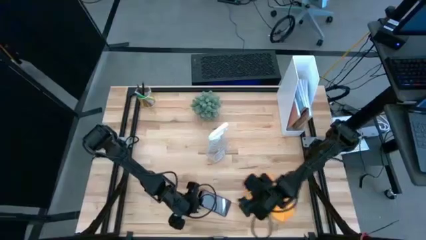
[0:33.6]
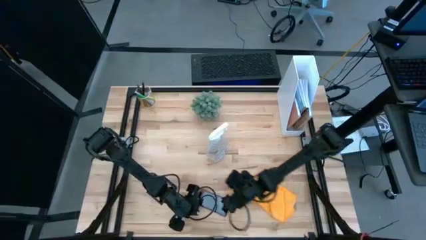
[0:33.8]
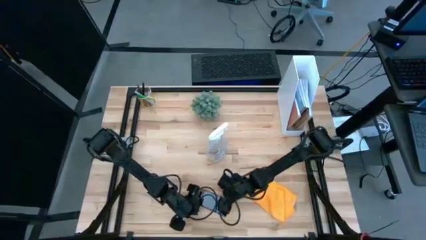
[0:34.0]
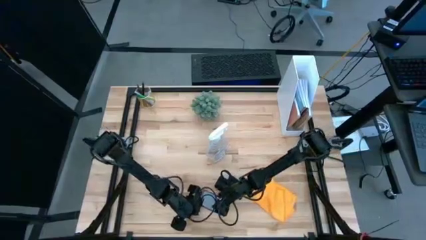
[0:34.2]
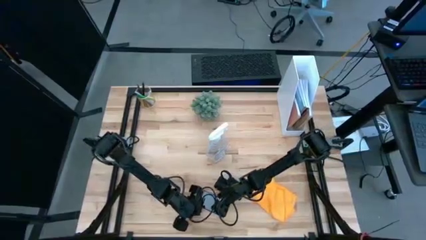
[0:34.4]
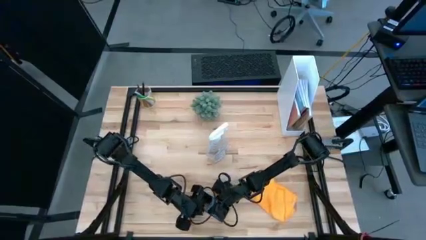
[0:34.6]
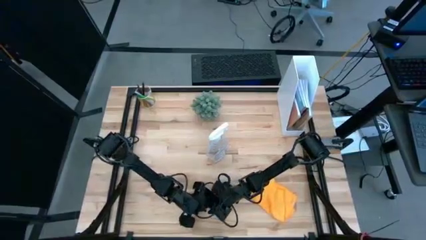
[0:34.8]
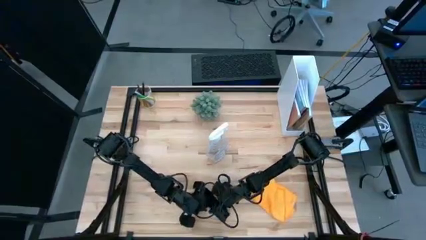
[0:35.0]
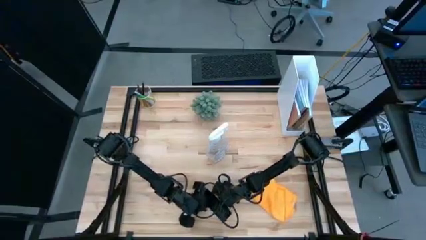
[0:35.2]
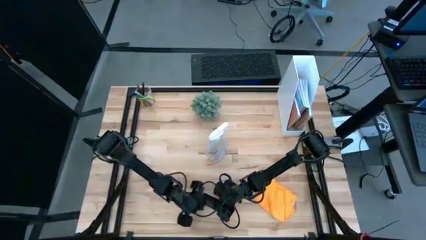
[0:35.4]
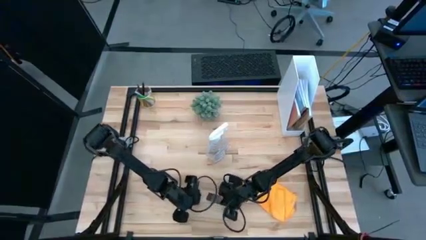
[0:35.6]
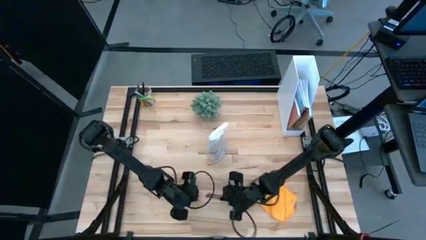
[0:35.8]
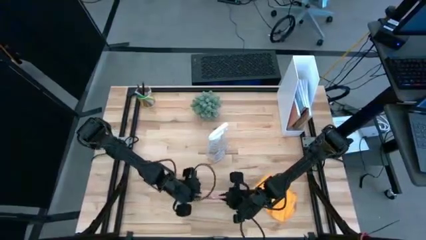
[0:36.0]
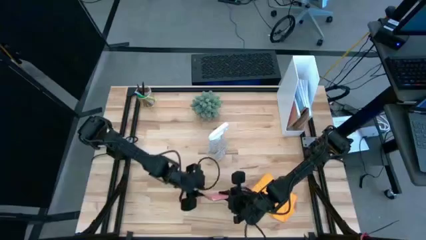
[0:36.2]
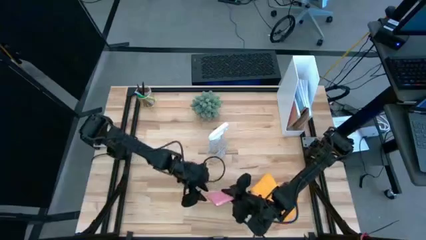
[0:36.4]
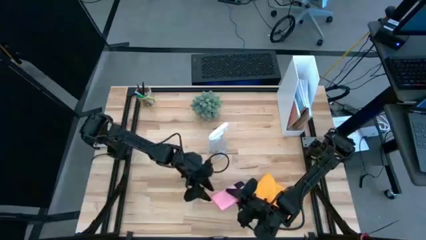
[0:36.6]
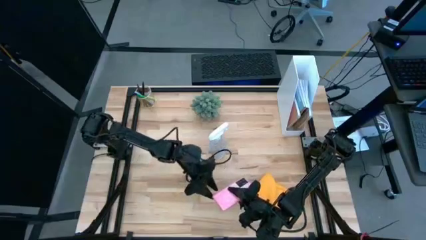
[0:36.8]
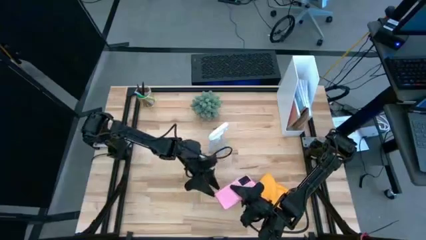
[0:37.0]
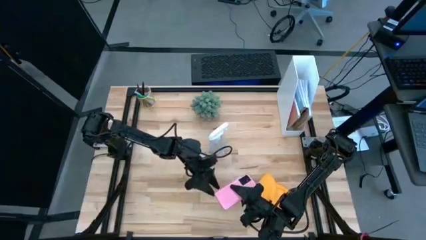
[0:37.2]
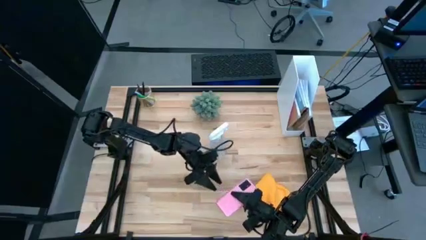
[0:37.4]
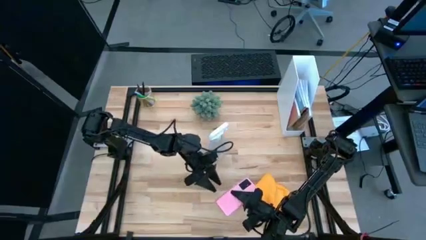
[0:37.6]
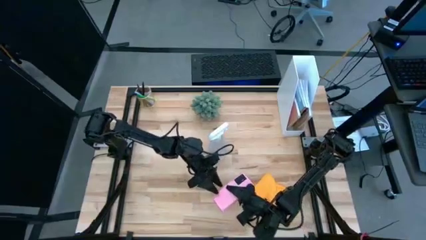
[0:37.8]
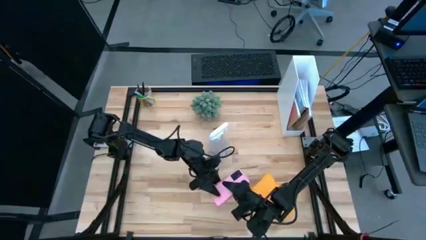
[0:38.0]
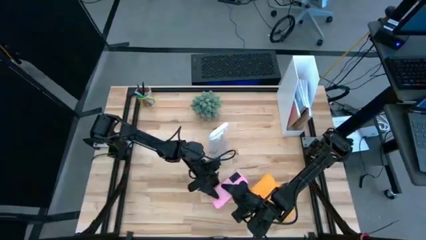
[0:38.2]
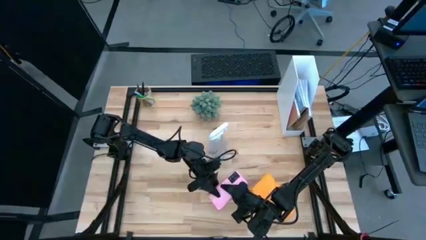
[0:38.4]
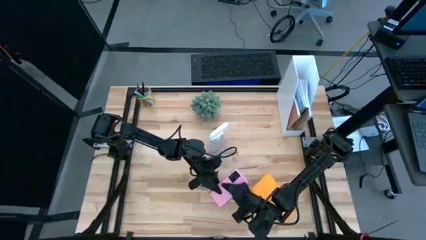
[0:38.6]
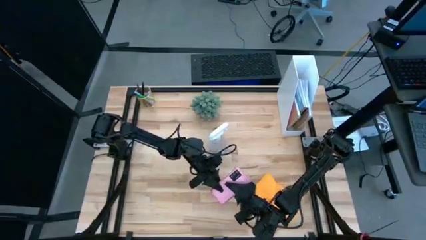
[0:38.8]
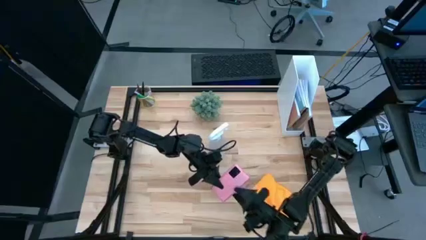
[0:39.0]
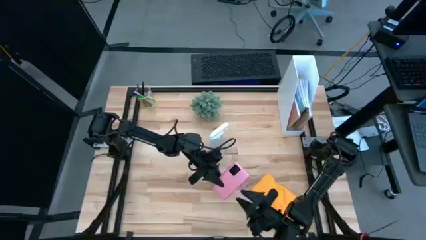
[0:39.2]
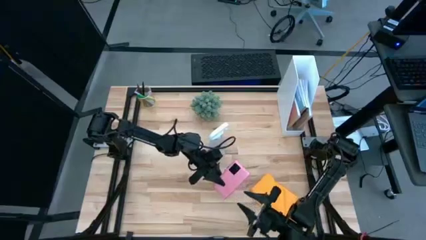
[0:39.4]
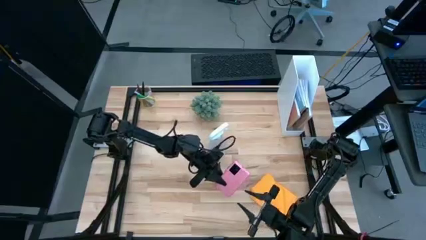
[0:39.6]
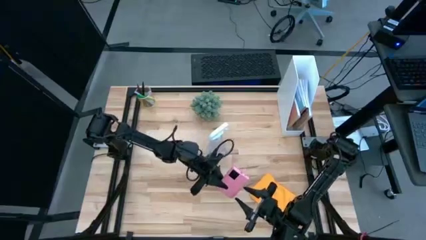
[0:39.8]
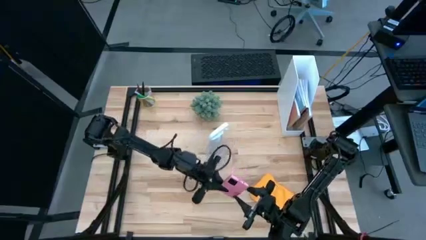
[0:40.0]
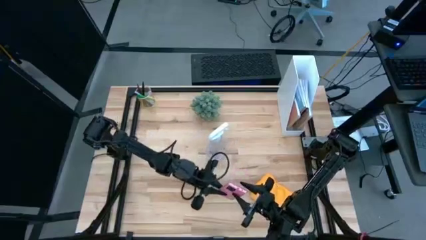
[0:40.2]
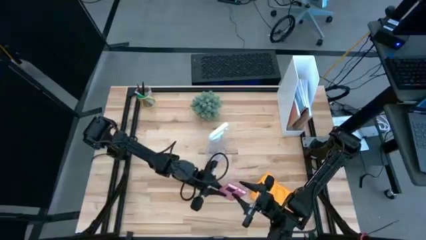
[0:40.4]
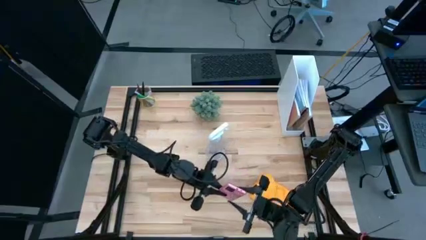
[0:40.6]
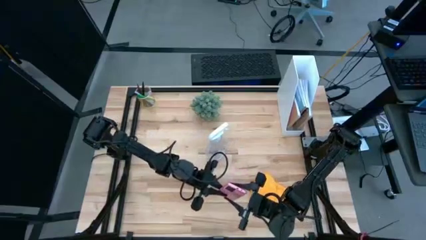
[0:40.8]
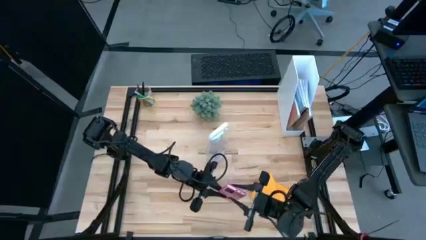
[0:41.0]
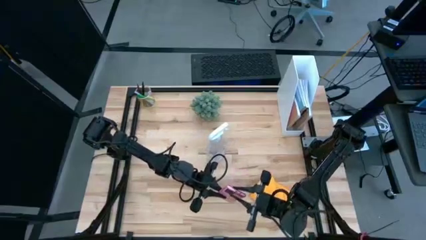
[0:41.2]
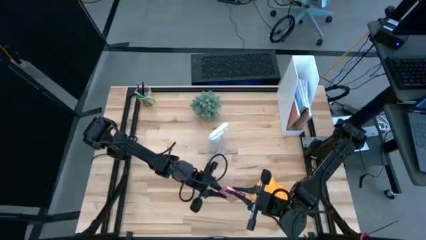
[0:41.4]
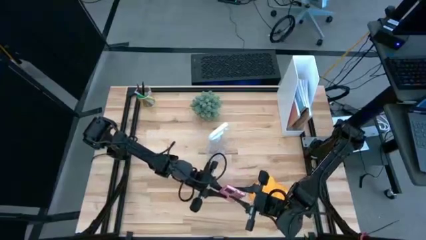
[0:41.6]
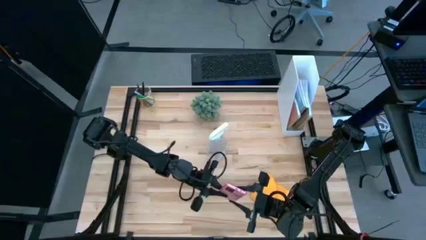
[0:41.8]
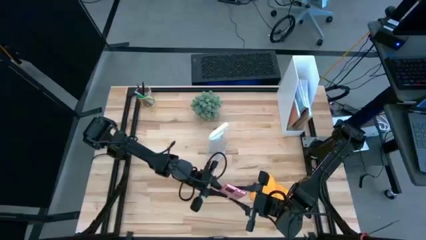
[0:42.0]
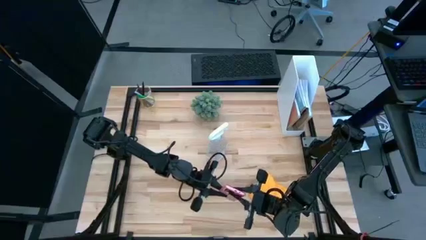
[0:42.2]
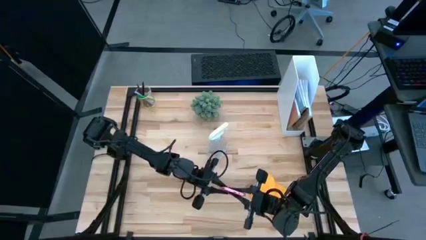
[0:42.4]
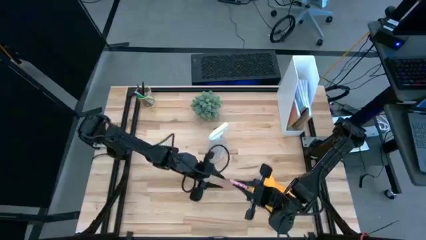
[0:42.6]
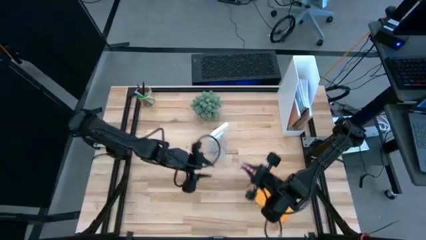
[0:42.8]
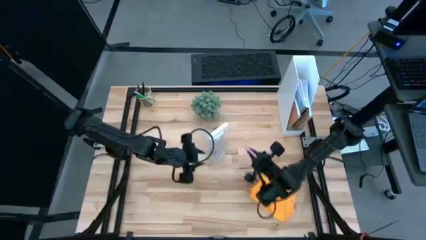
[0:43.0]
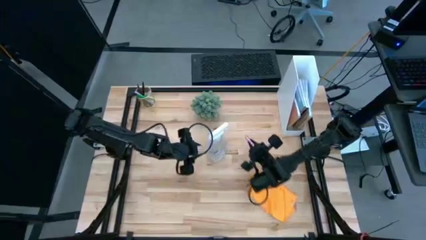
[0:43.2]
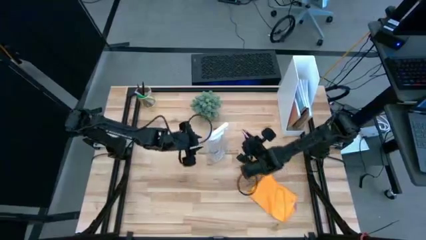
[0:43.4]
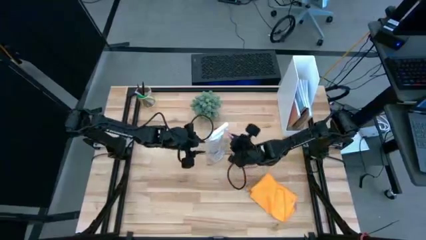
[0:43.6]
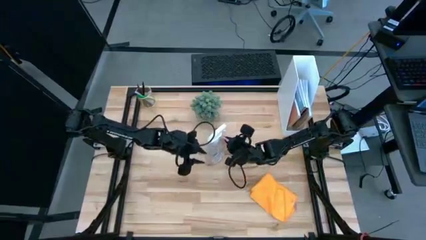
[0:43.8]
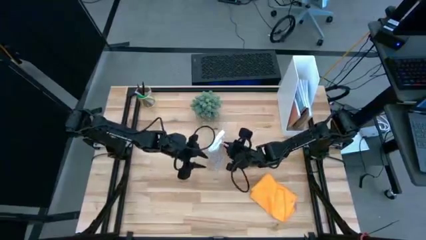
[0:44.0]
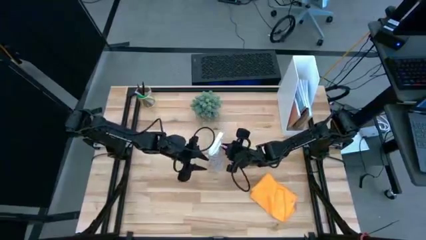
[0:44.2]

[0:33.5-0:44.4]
Task: Apply microfiber cloth
Spray the back of the pink phone with the white spray bottle
